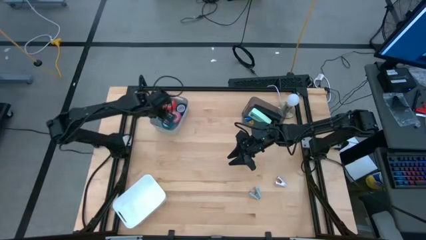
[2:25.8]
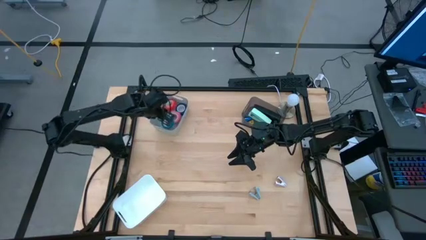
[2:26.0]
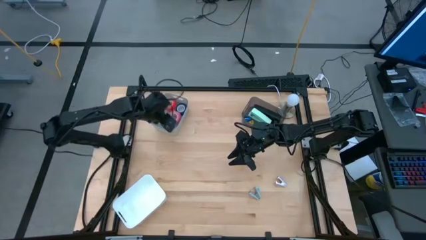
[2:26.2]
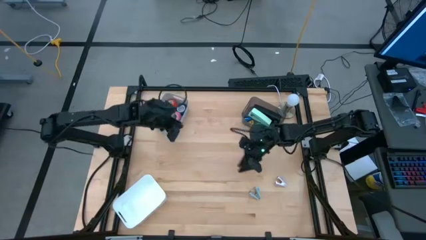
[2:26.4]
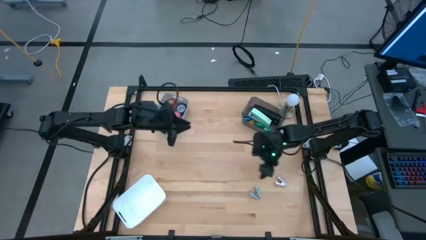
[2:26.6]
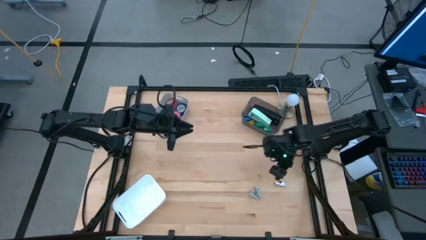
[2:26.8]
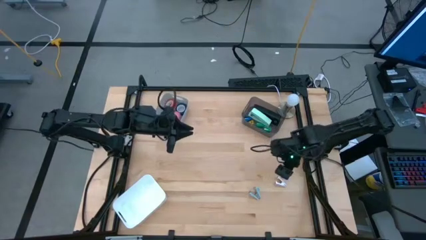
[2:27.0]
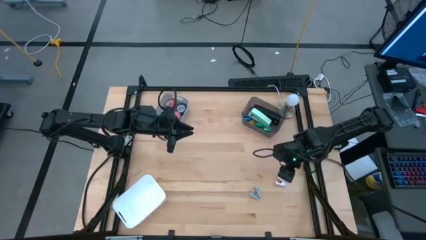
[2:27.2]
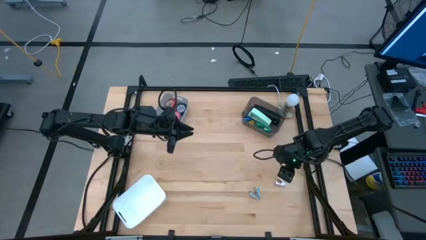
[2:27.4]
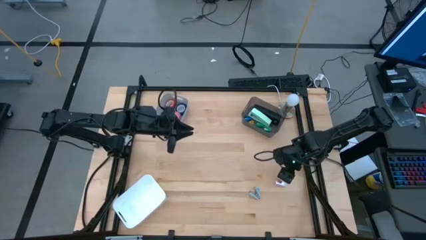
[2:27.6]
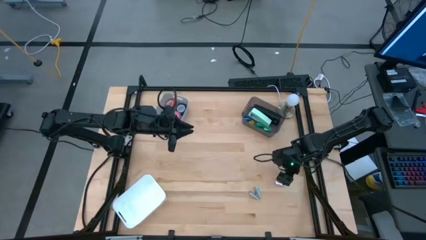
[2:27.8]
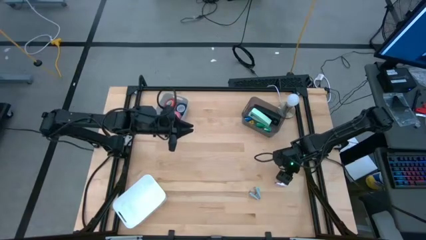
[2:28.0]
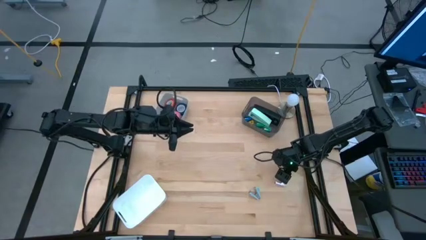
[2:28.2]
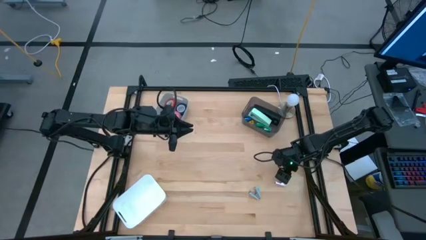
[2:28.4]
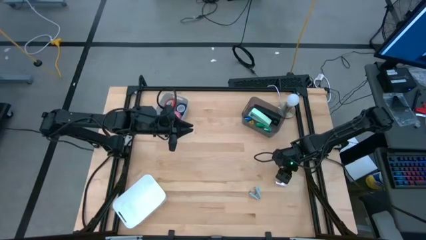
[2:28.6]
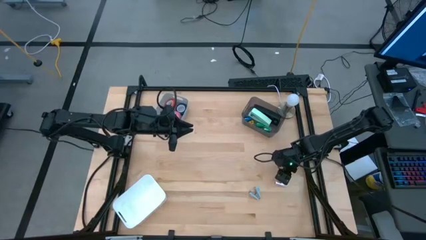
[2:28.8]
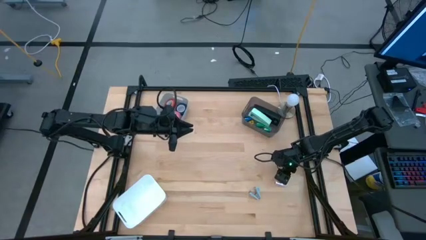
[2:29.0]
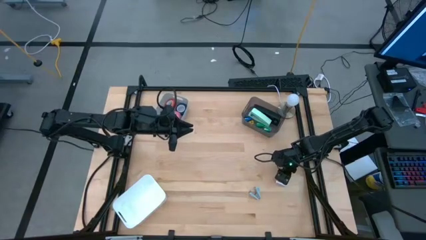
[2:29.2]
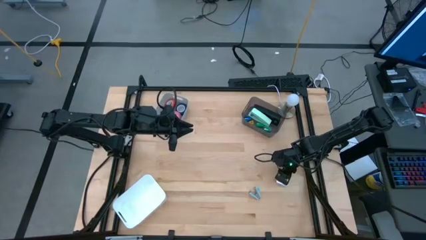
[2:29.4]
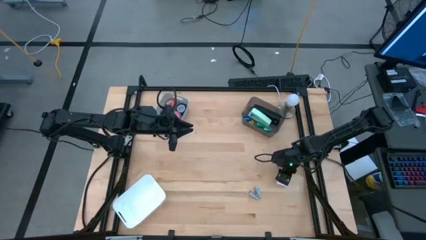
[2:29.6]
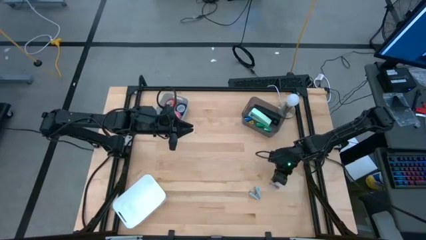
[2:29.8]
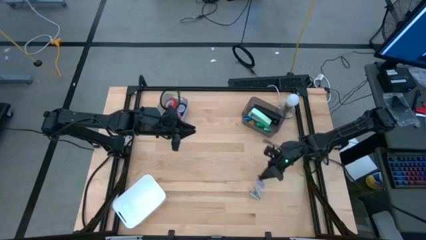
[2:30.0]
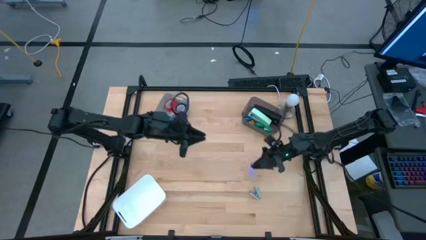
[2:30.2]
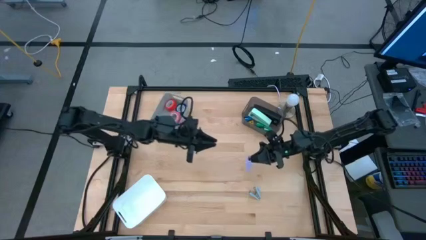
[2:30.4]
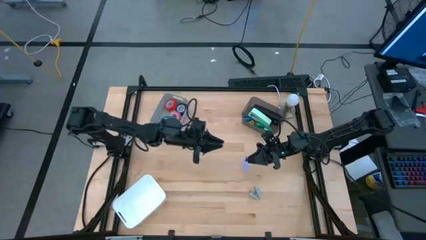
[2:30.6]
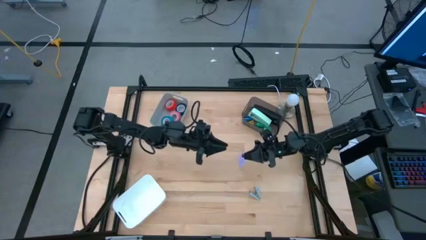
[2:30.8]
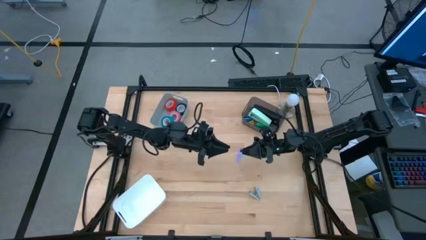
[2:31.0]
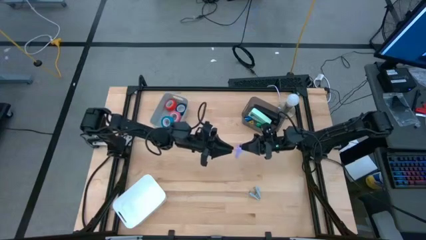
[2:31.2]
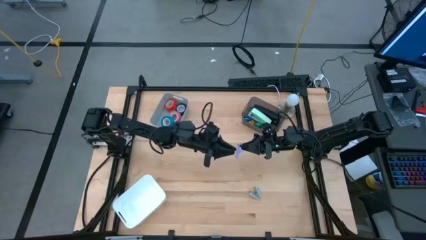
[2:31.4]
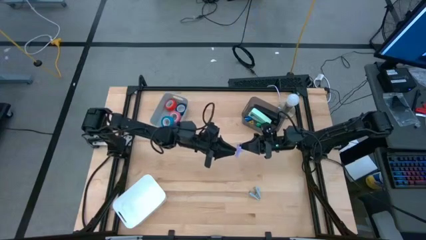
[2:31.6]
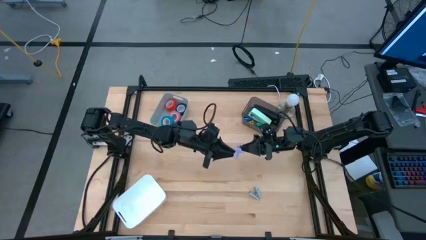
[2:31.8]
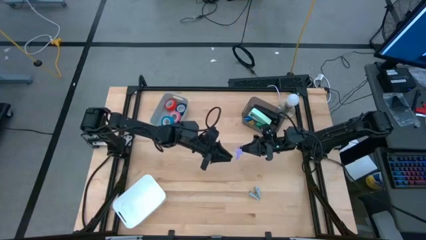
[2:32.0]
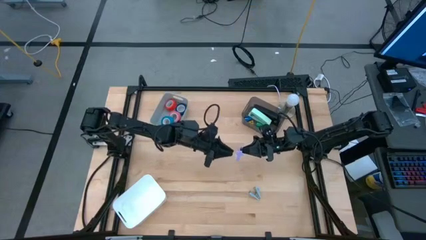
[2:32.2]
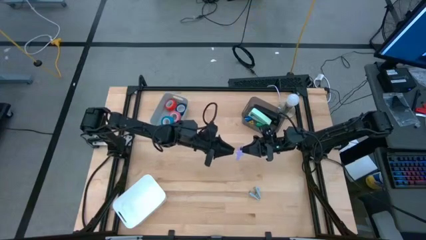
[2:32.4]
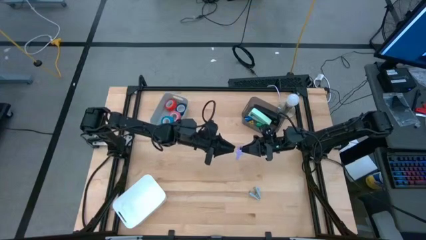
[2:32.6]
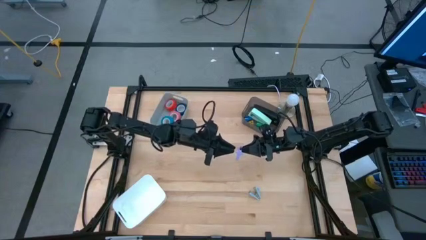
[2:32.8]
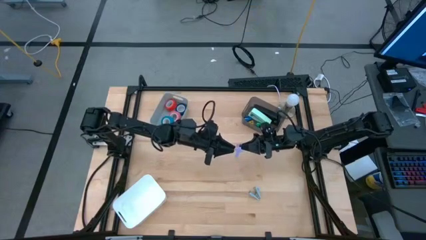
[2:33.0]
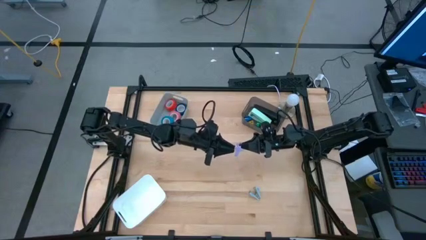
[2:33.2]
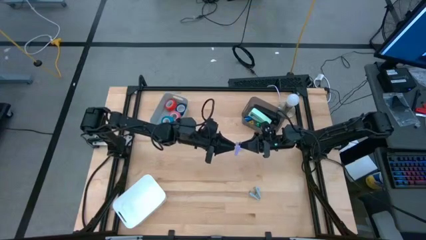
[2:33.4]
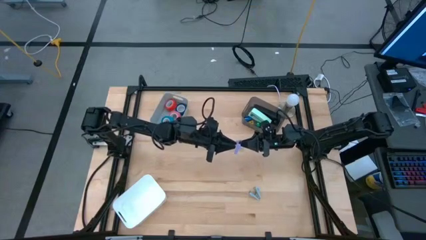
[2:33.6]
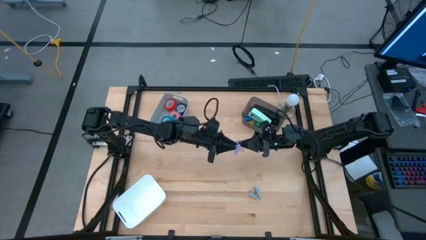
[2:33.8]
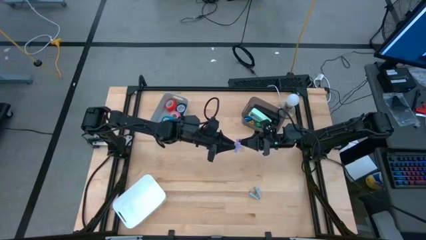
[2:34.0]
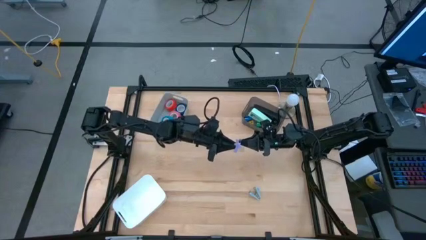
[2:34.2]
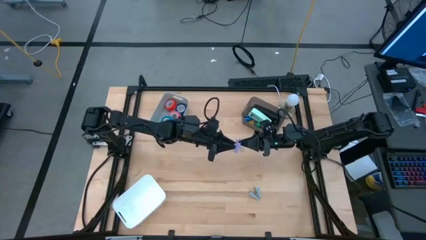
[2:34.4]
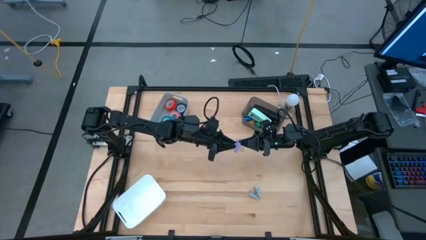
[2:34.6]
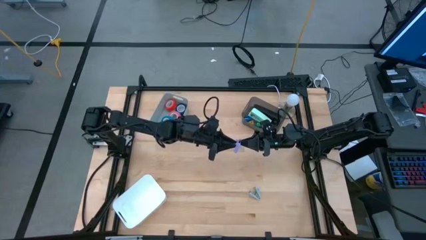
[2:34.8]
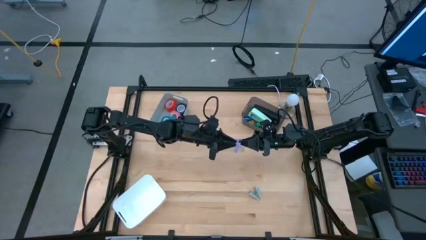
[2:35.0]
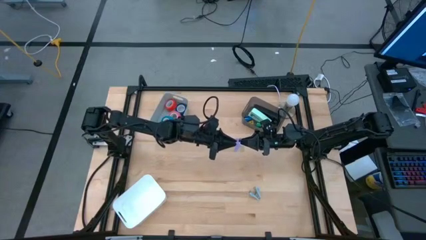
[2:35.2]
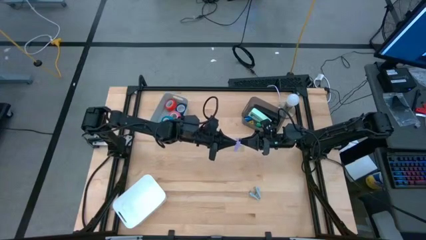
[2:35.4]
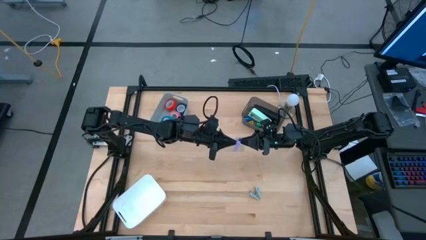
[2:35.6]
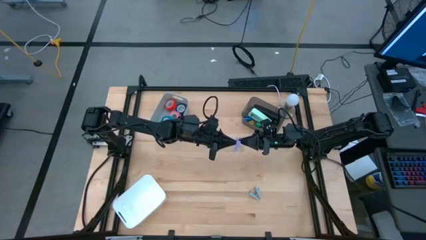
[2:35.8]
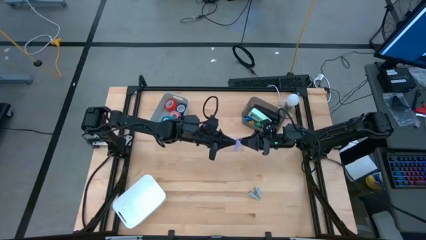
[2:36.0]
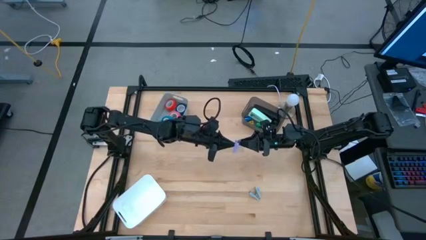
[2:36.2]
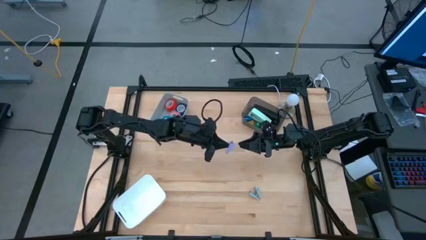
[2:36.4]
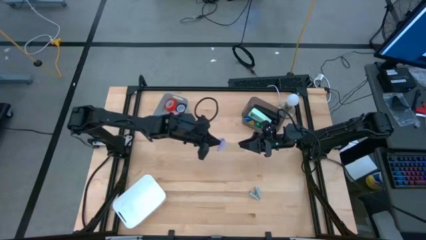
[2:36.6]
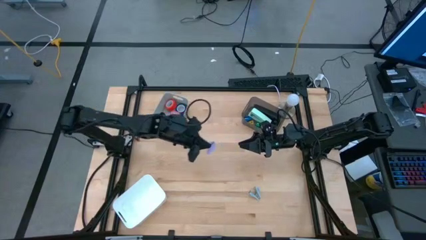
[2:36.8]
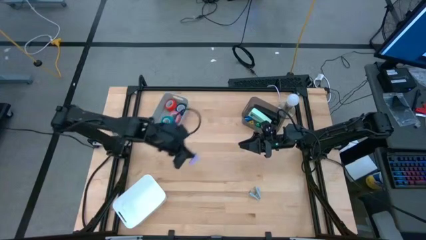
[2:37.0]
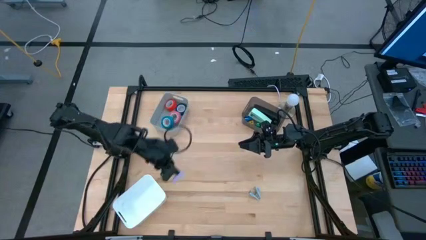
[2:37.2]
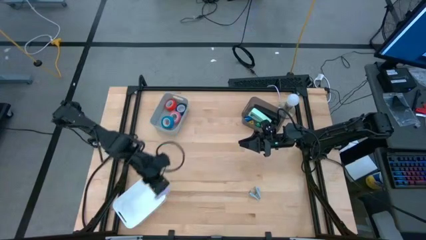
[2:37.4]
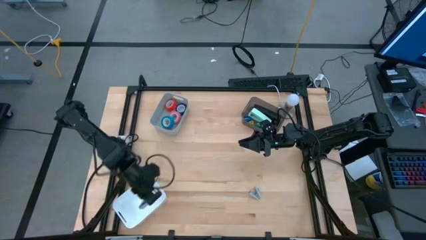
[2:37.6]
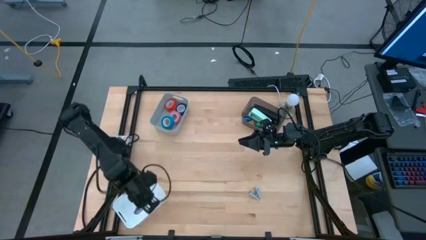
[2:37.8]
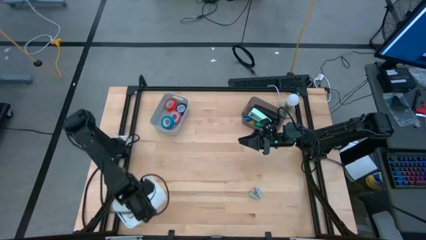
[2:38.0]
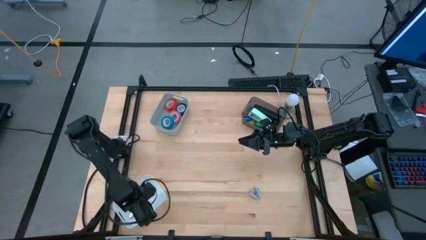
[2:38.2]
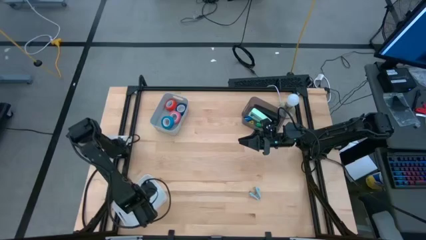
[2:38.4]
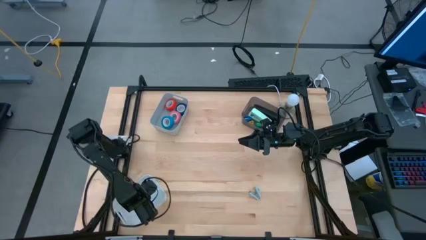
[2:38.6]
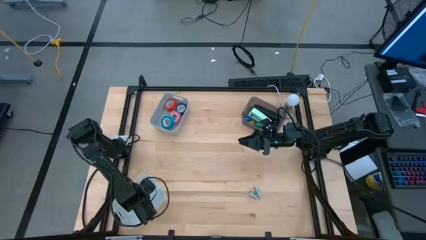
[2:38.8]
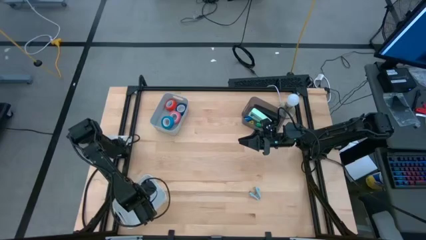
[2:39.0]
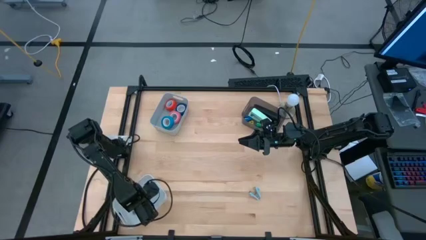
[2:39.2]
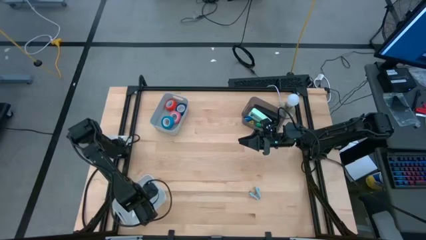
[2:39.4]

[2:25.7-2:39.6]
Task: Pick and place Stapler, Stapler remover, tape
Put the purple staple remover into the white bin

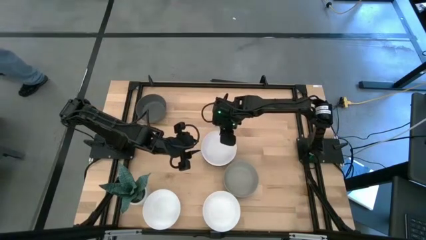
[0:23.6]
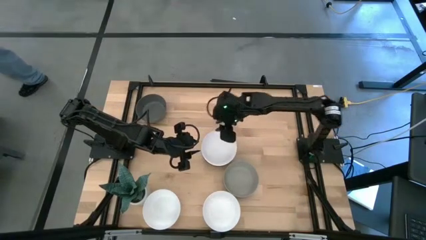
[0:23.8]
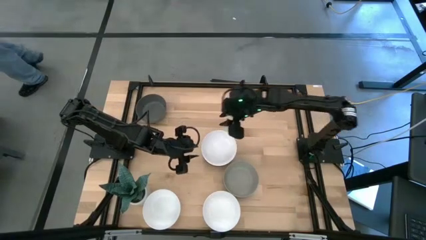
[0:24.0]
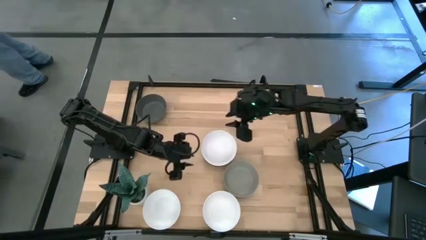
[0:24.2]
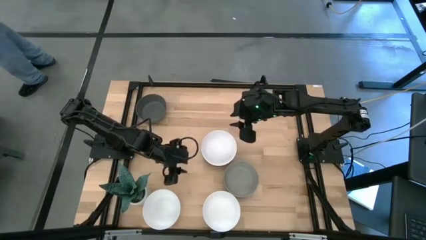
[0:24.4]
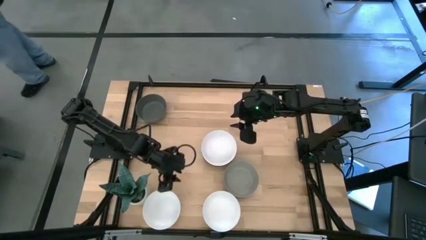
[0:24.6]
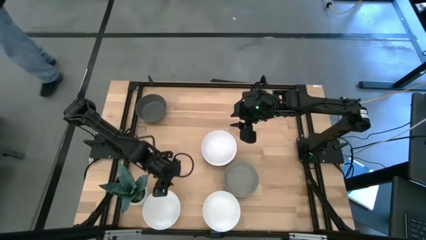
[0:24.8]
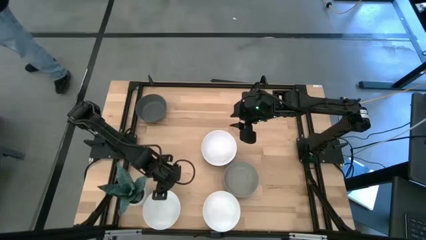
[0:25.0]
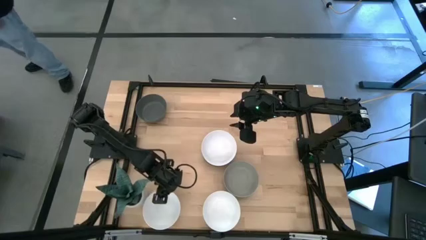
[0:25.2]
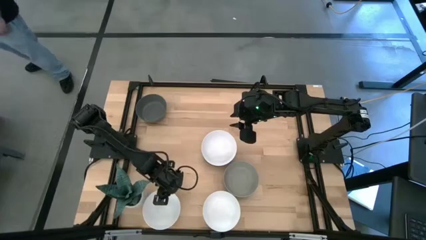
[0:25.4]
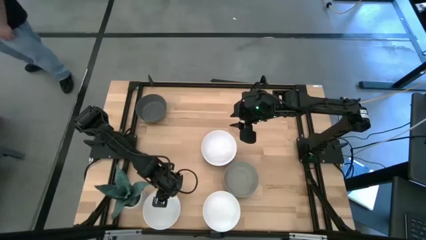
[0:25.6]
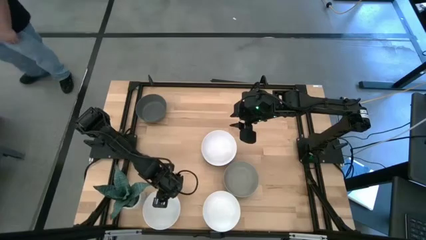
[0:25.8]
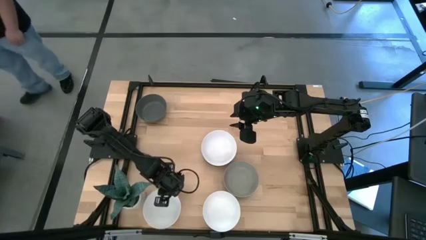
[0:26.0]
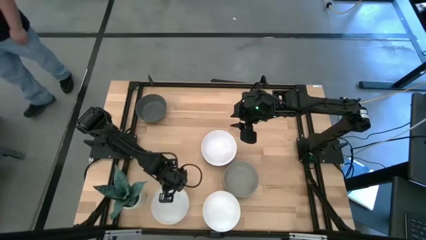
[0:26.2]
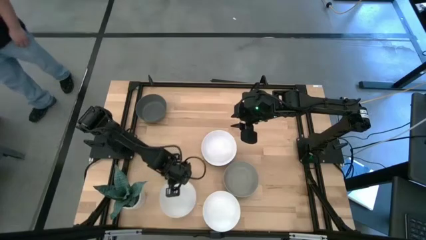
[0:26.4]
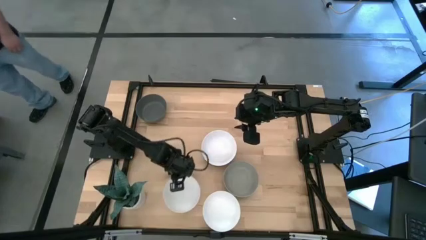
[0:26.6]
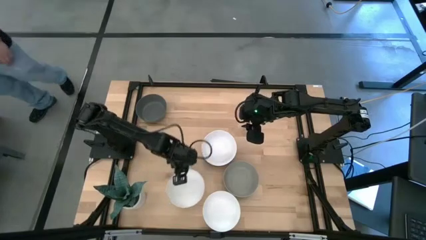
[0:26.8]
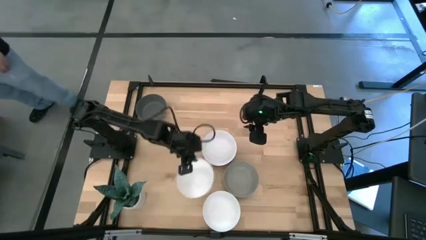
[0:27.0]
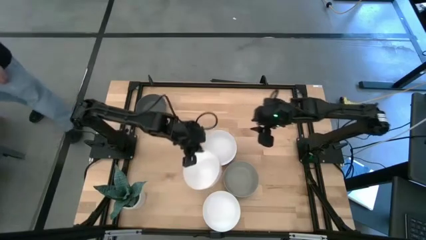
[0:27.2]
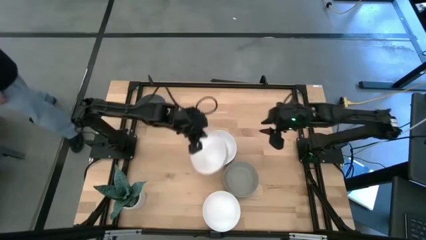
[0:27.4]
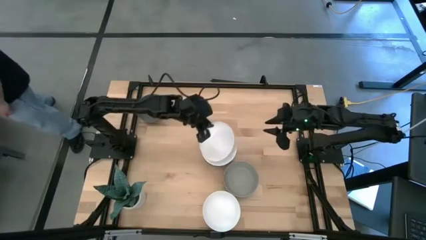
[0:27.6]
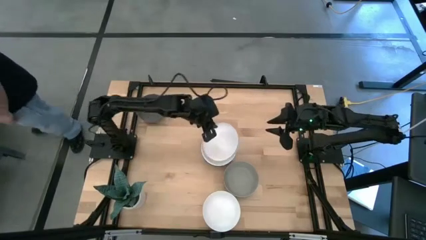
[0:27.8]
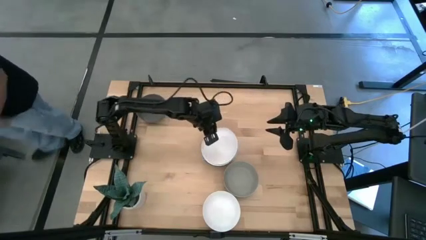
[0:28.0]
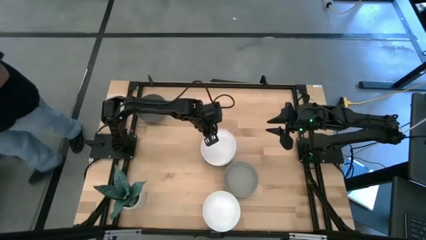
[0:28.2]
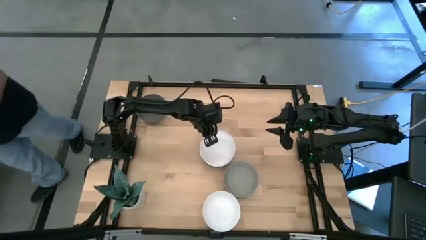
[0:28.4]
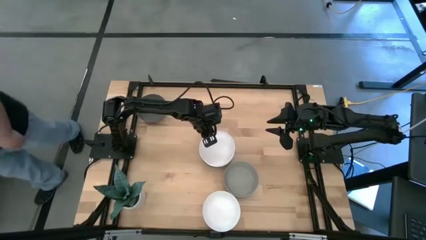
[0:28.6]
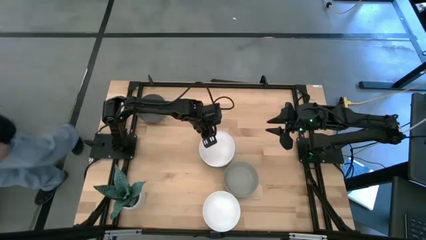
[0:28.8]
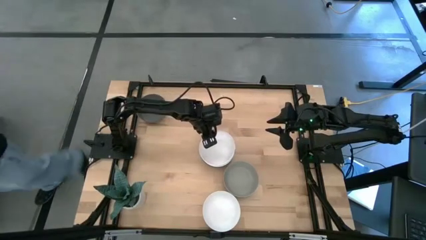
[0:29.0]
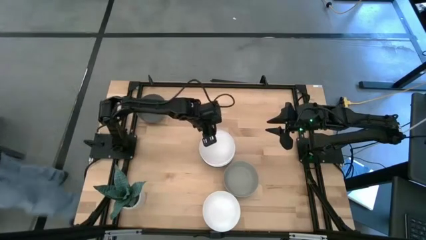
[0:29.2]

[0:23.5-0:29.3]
Task: Nest bowls inside each other
Stack the white bowl on top of the white bowl
